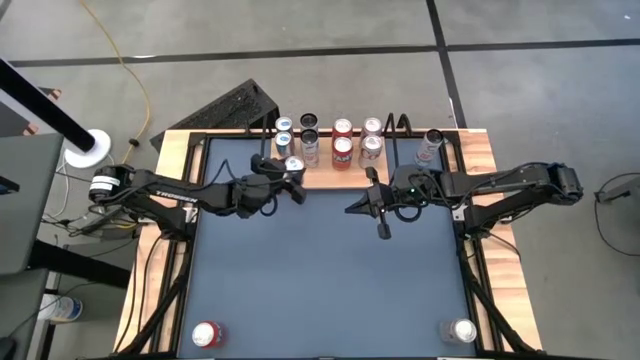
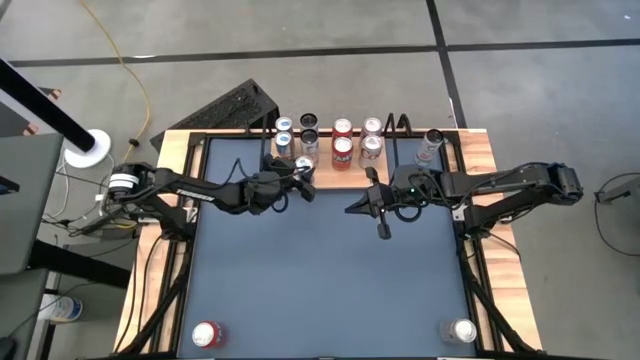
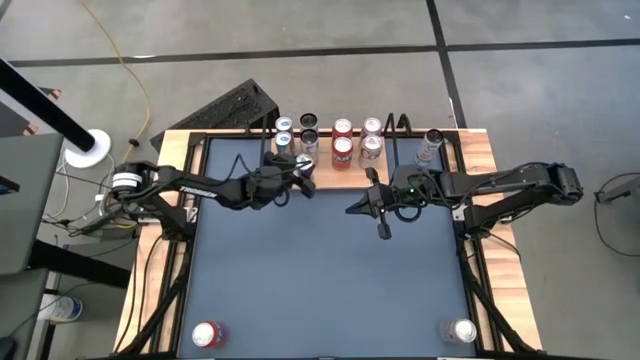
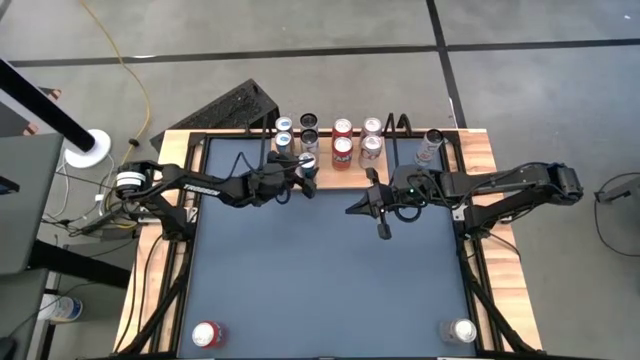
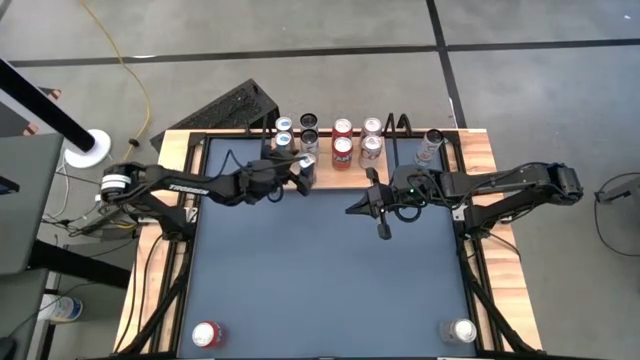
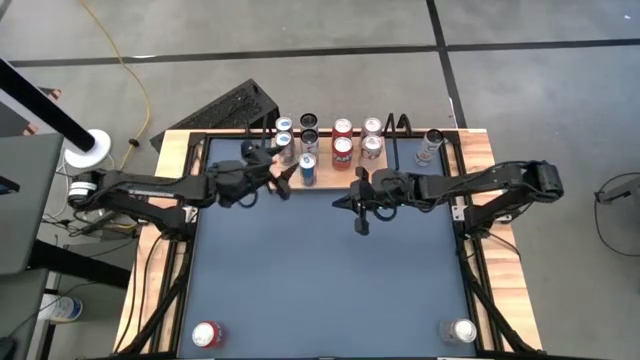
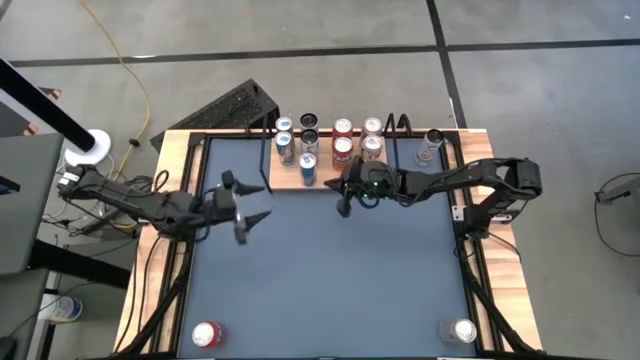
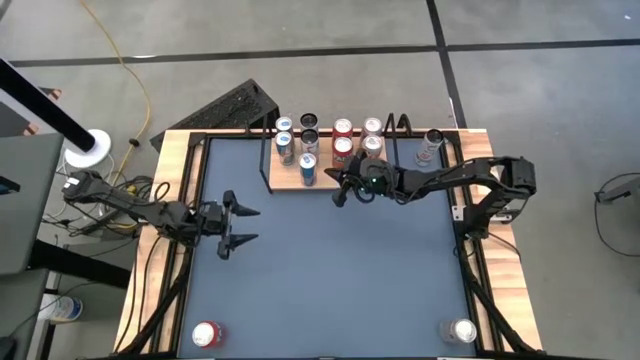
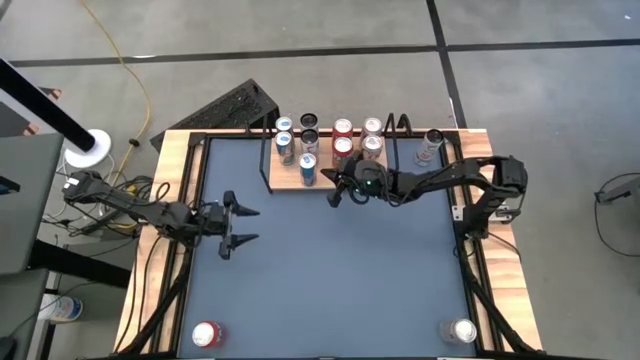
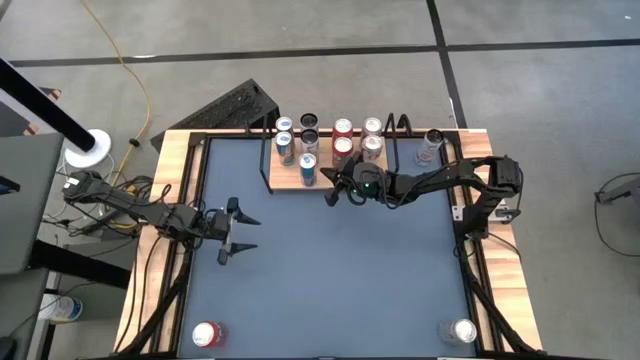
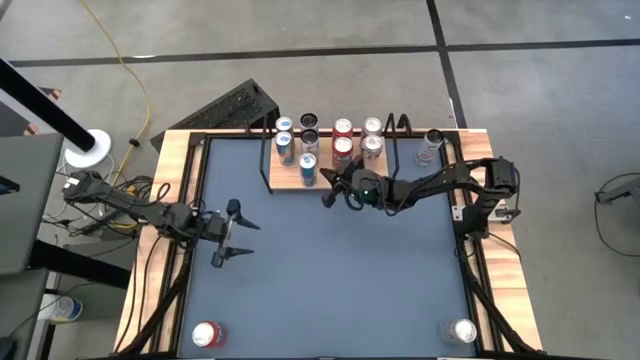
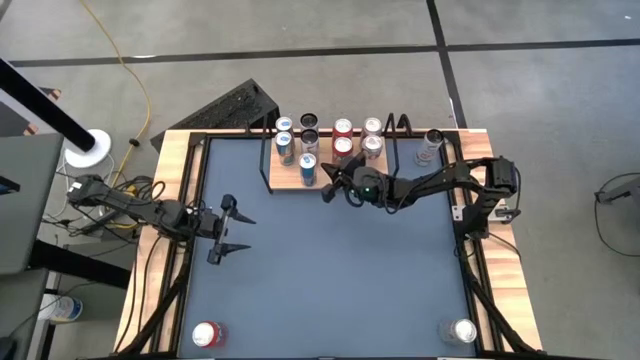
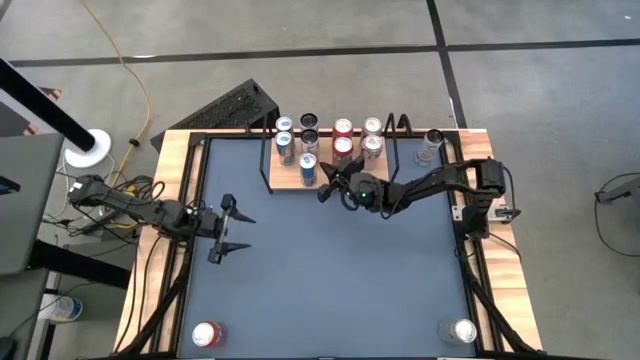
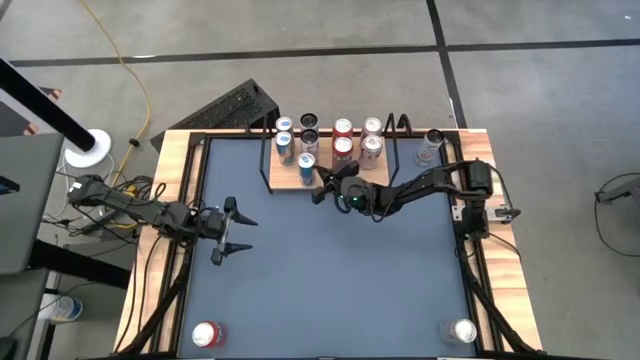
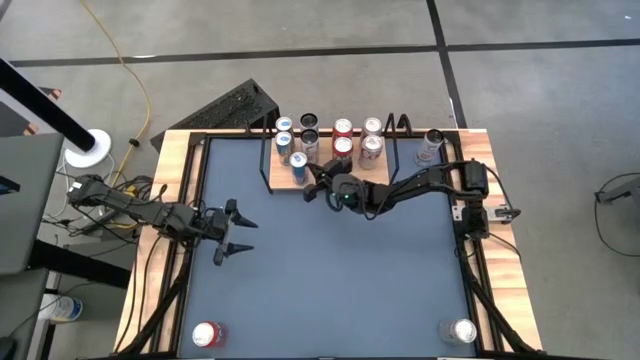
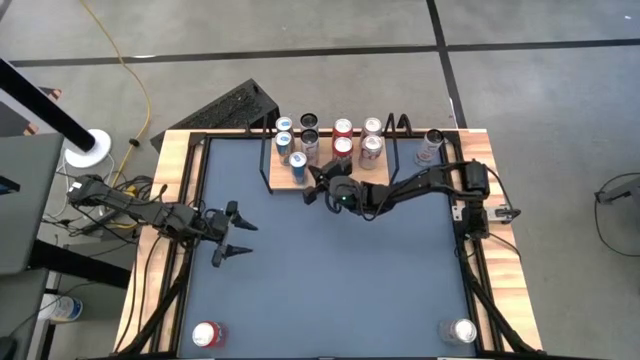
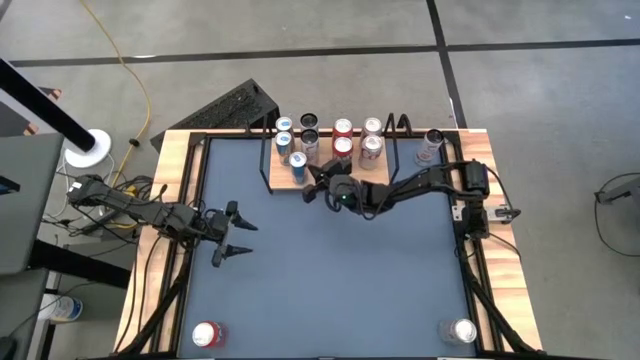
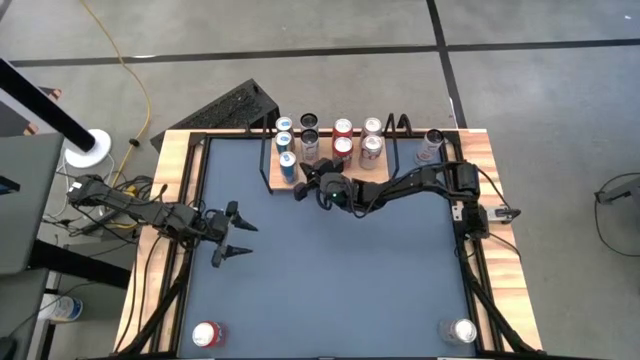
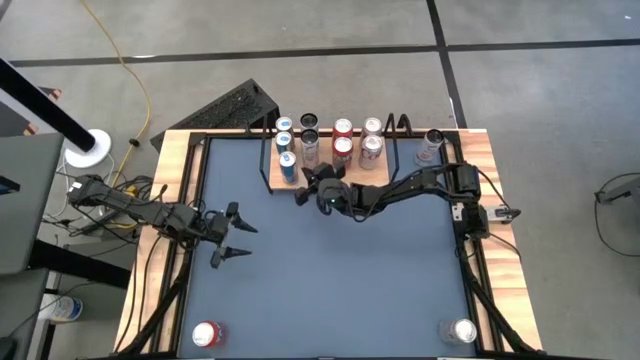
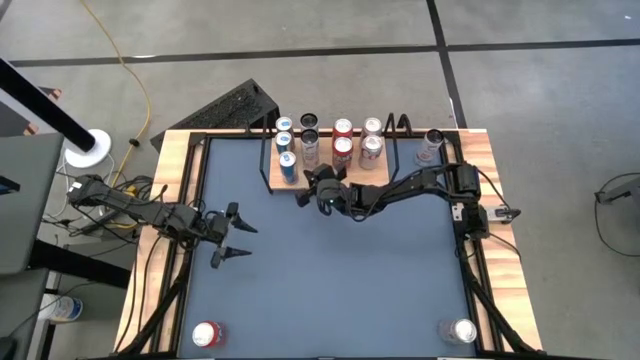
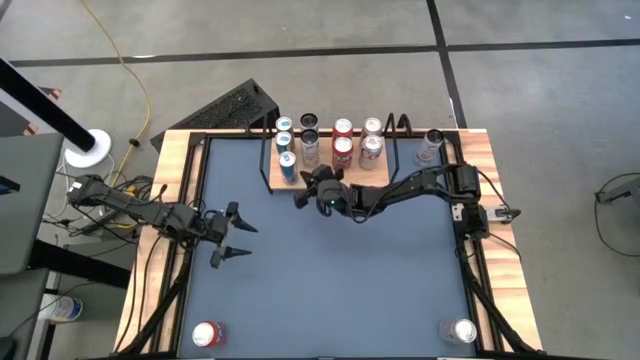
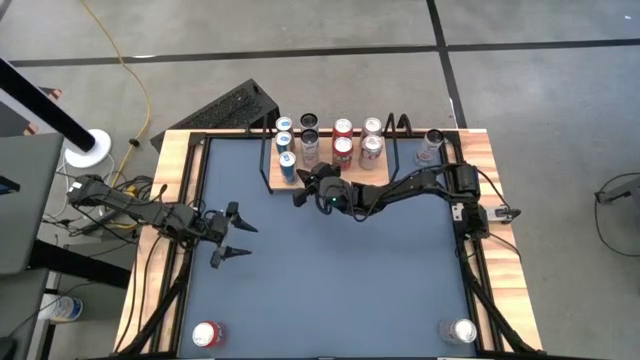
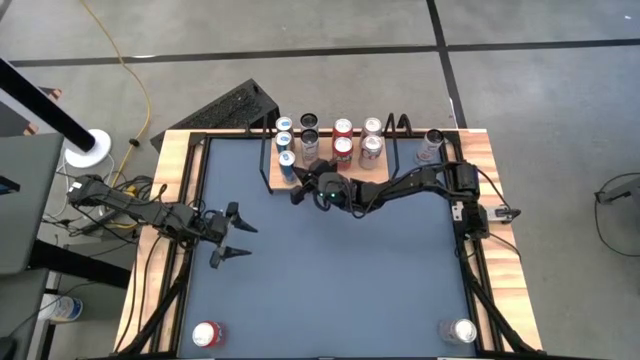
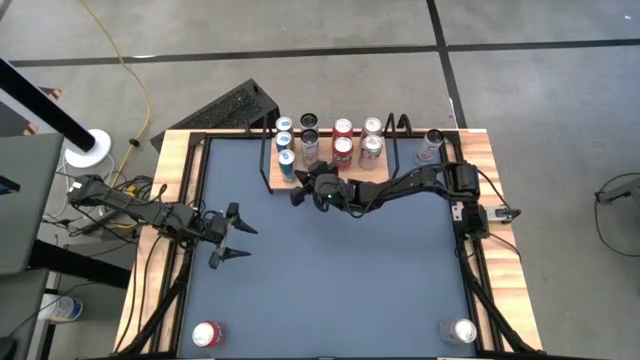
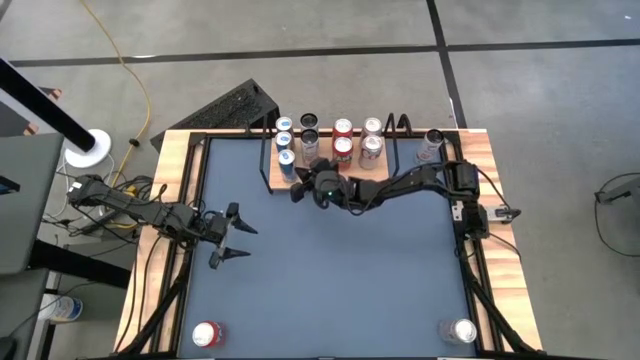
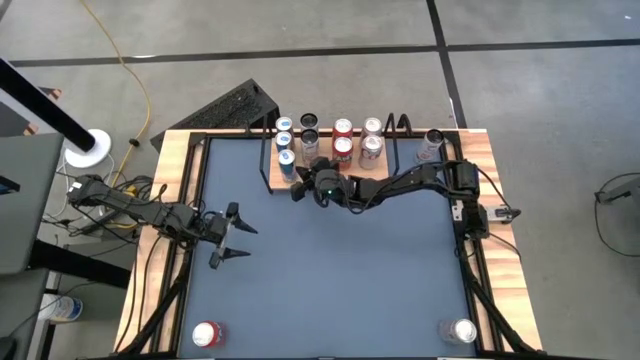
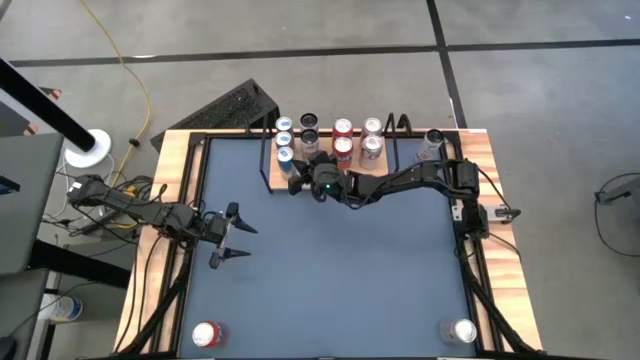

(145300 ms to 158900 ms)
Task: Place canned beverage on shelf
Put the blue soda can on the shelf aligned with the other blue soda cans

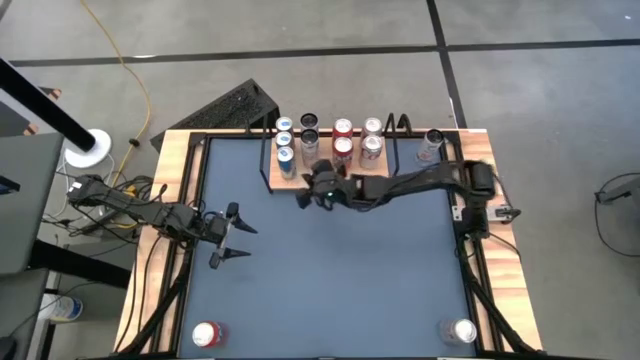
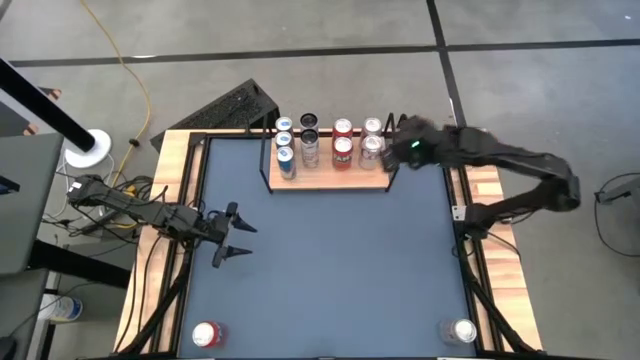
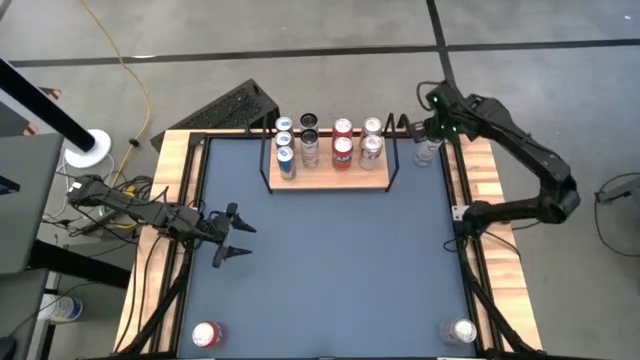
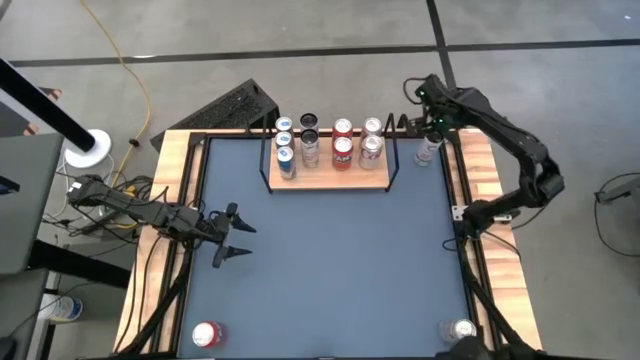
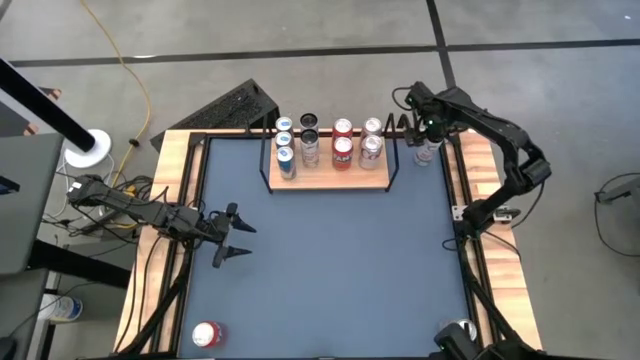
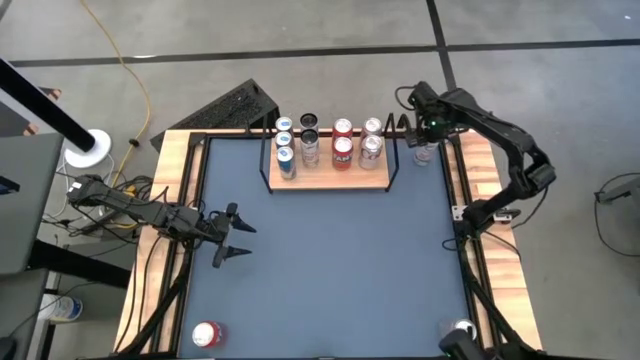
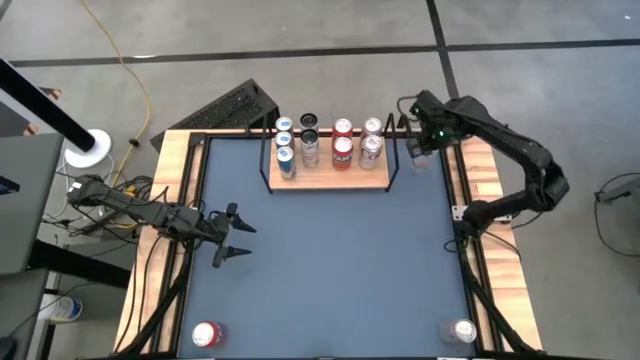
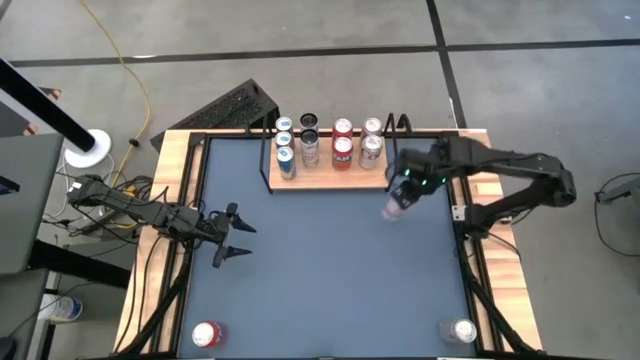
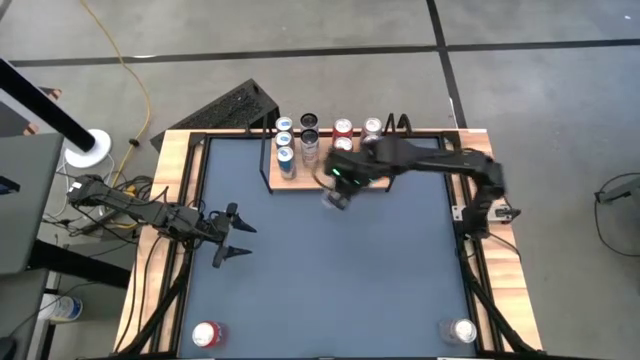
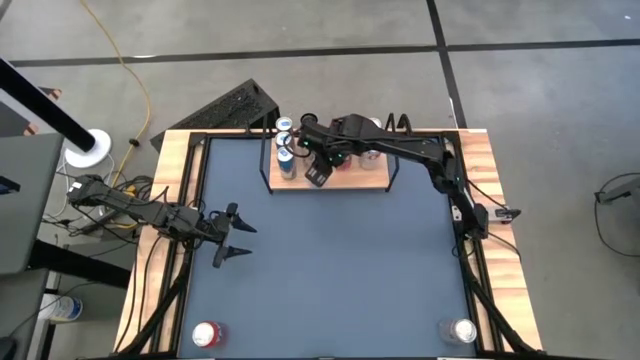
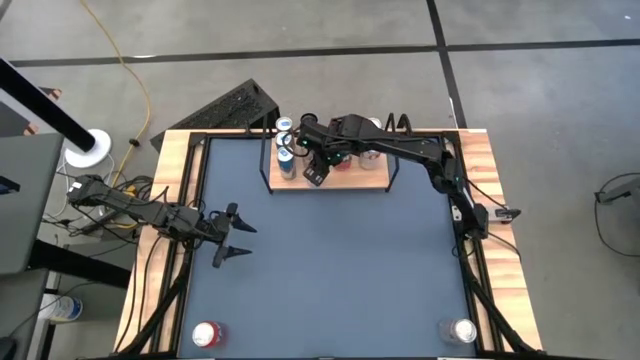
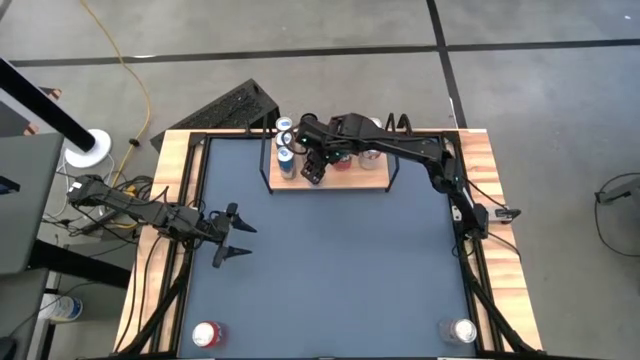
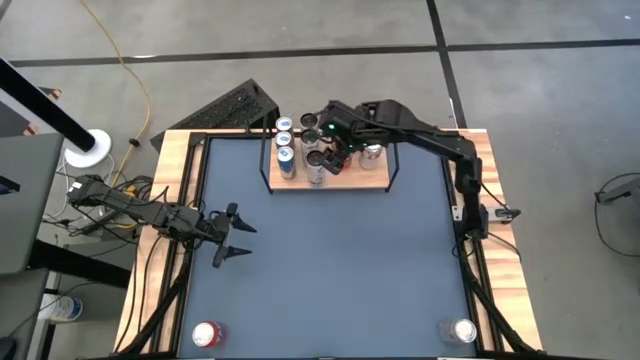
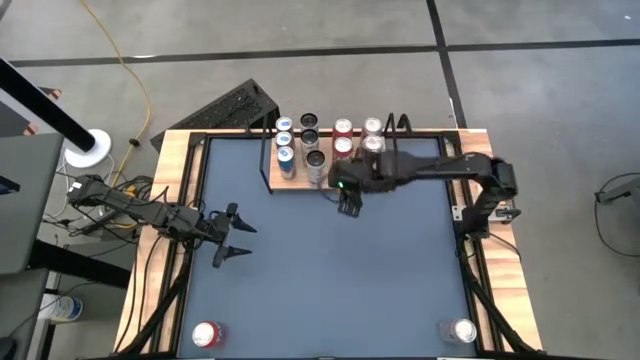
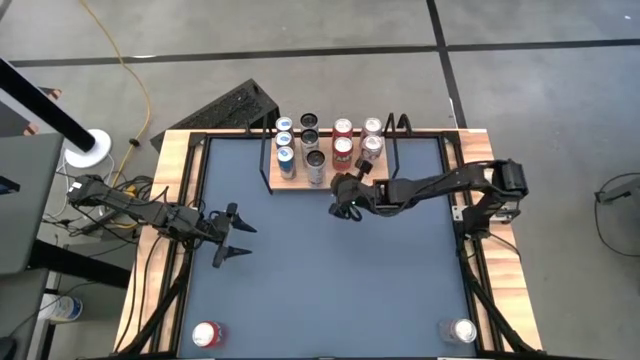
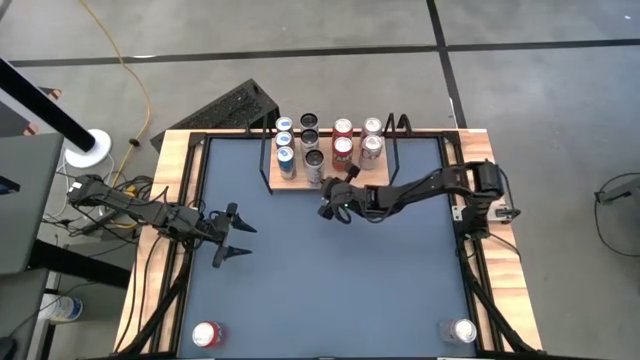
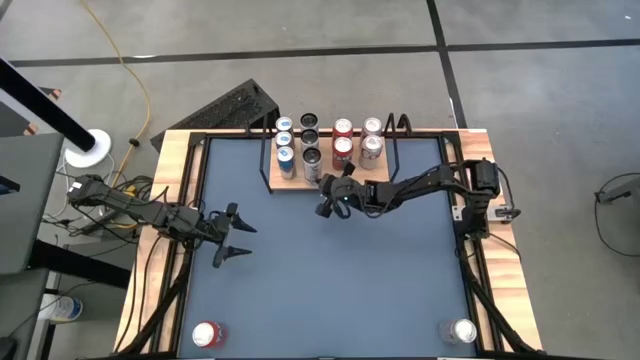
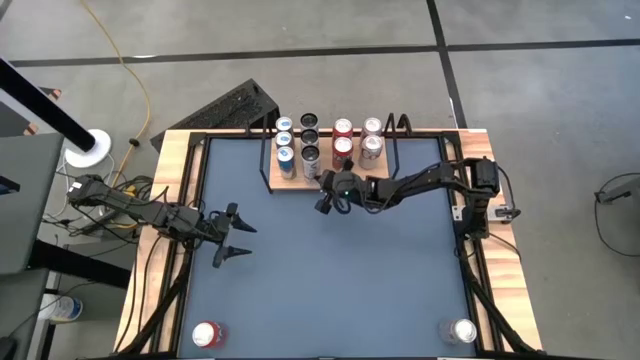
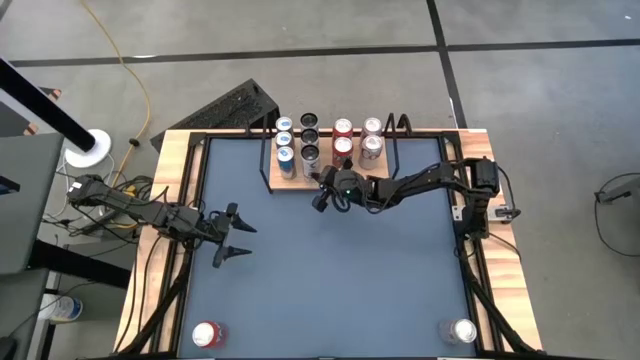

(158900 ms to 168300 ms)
Put the white-pink soda can on the shelf aligned with the other white-pink soda cans
